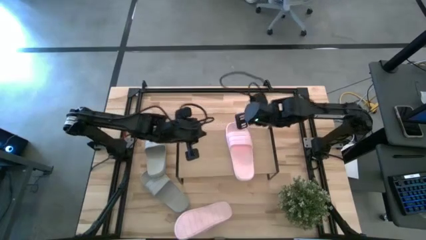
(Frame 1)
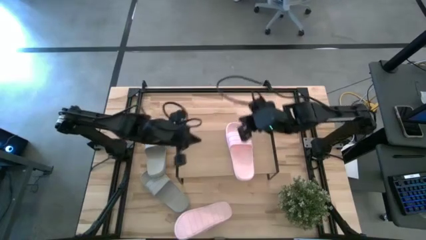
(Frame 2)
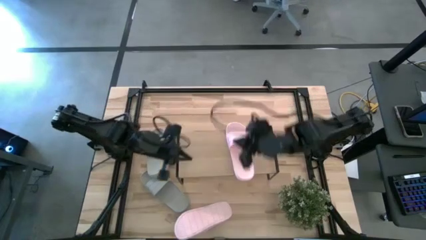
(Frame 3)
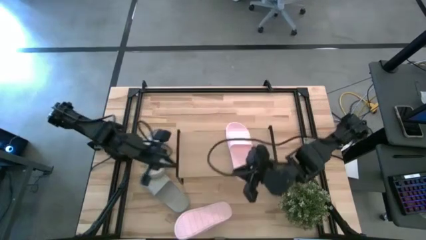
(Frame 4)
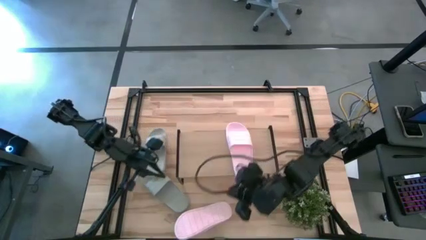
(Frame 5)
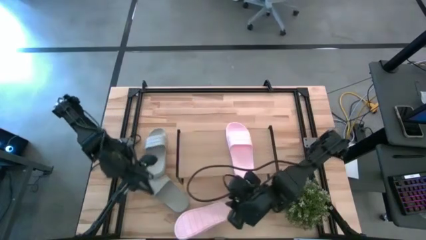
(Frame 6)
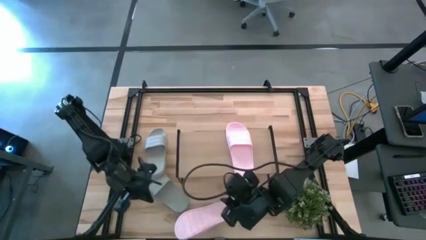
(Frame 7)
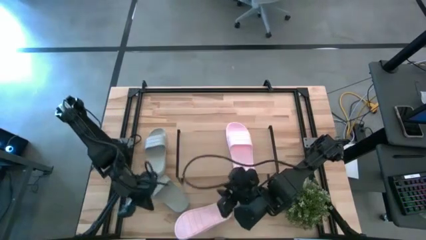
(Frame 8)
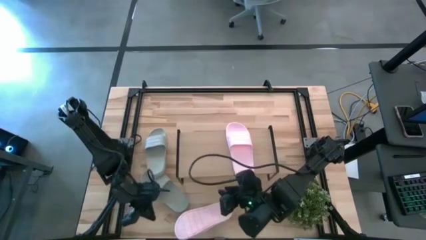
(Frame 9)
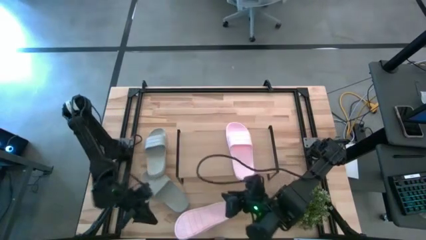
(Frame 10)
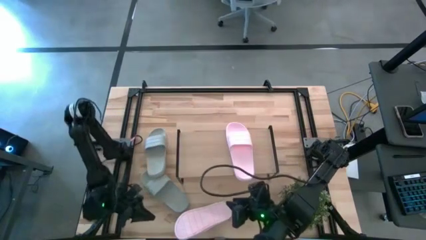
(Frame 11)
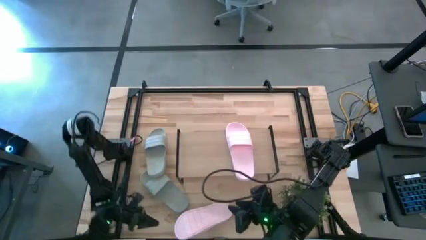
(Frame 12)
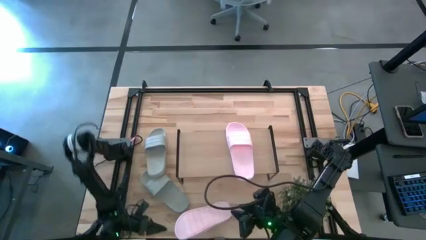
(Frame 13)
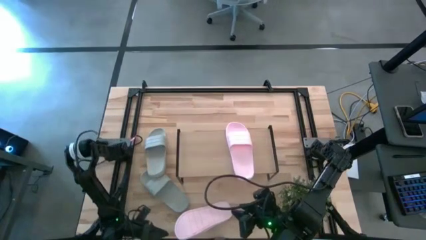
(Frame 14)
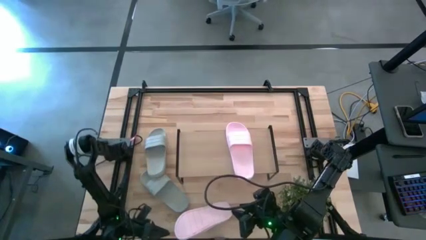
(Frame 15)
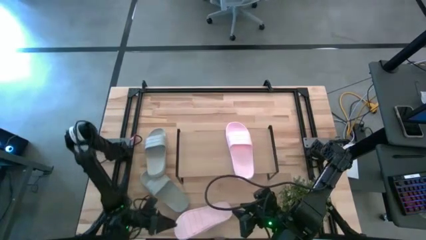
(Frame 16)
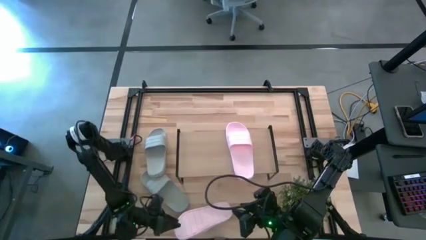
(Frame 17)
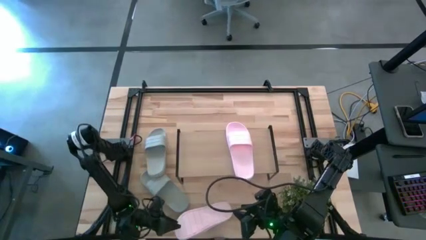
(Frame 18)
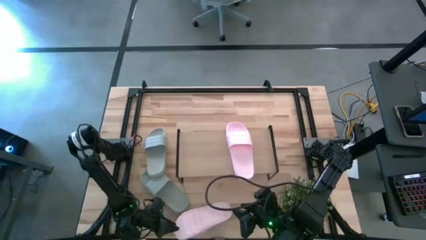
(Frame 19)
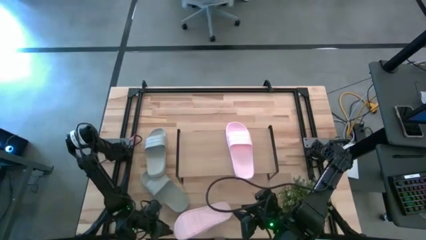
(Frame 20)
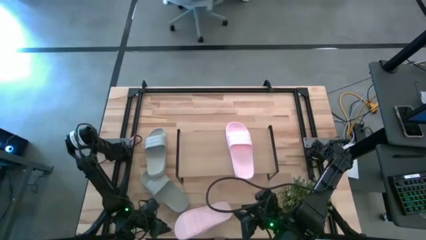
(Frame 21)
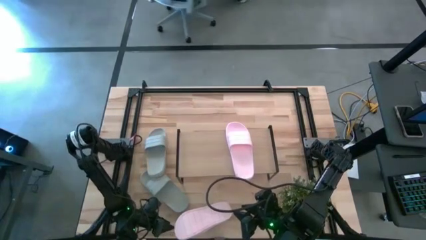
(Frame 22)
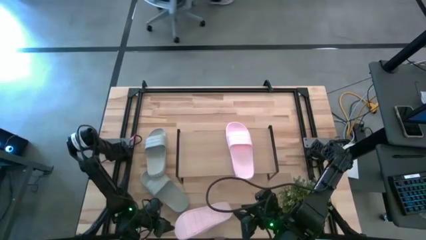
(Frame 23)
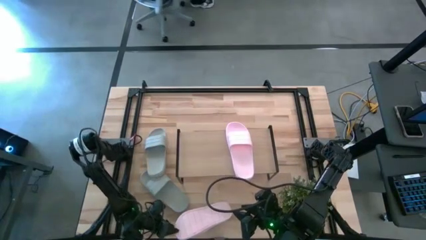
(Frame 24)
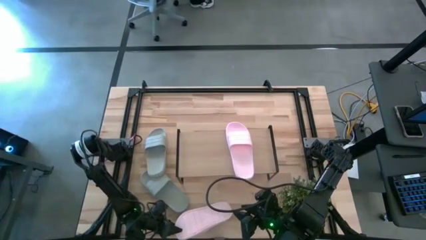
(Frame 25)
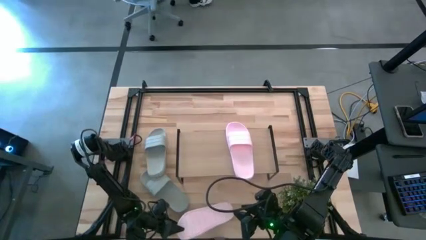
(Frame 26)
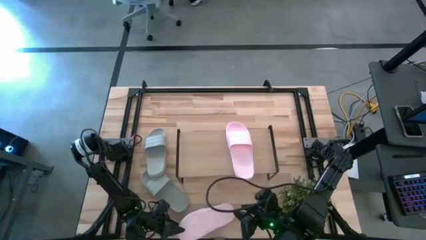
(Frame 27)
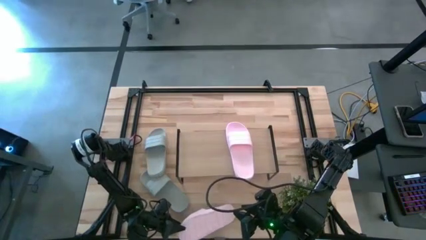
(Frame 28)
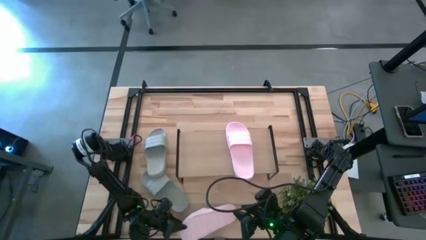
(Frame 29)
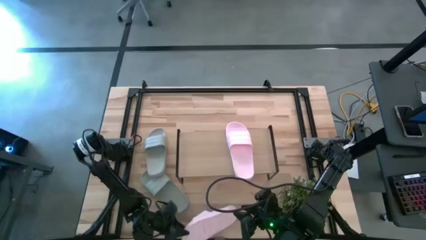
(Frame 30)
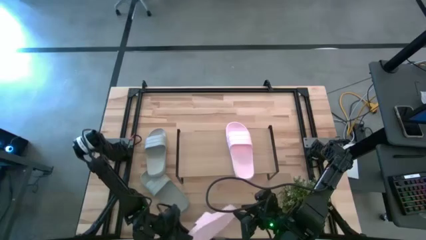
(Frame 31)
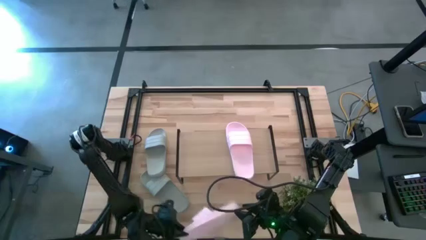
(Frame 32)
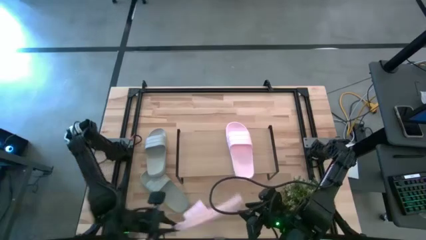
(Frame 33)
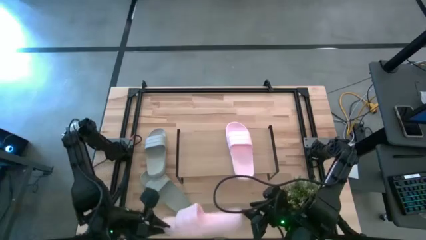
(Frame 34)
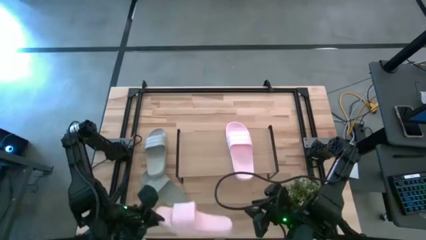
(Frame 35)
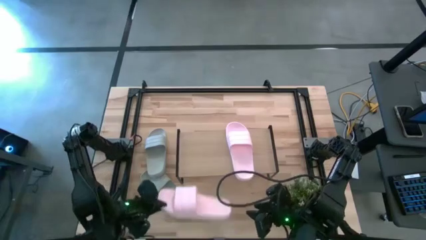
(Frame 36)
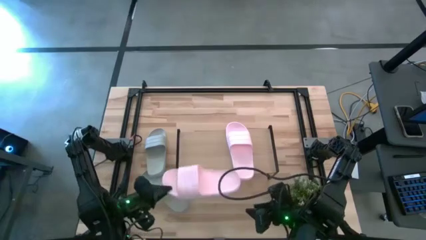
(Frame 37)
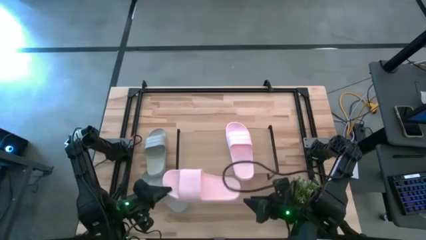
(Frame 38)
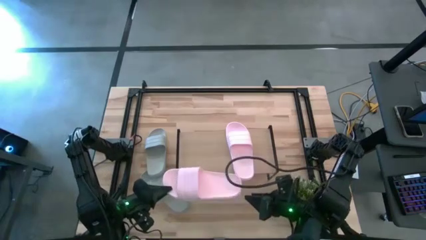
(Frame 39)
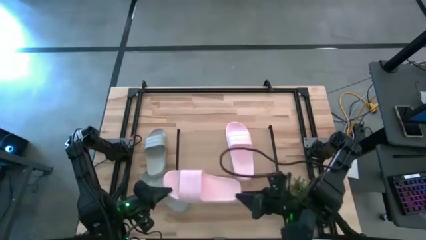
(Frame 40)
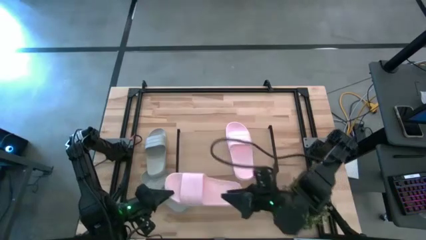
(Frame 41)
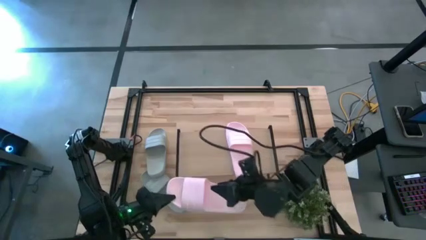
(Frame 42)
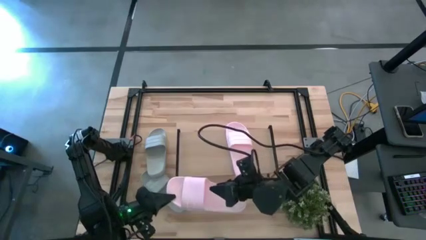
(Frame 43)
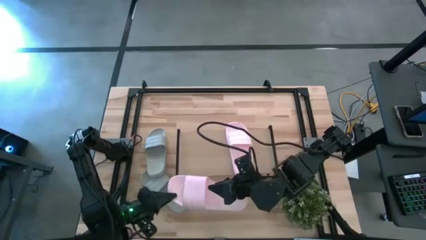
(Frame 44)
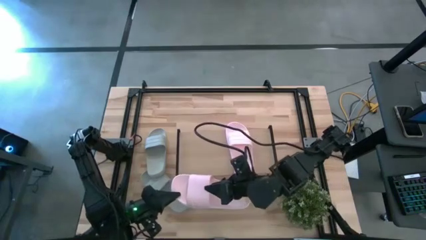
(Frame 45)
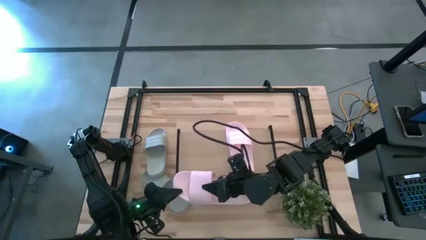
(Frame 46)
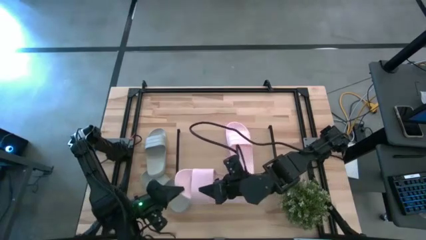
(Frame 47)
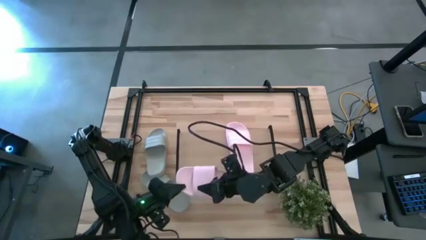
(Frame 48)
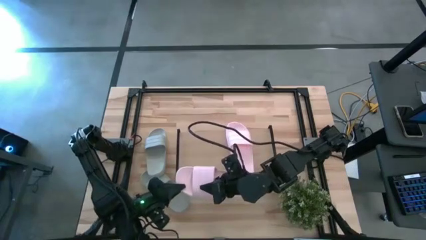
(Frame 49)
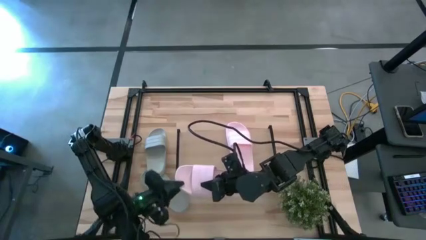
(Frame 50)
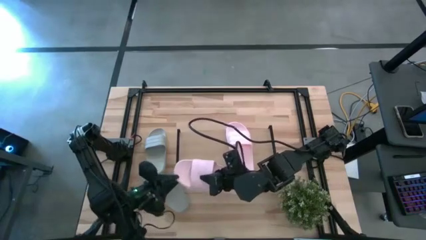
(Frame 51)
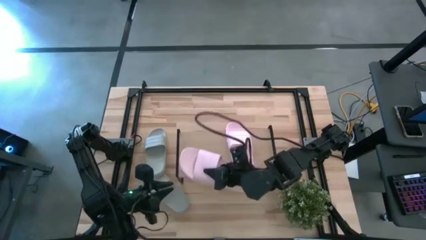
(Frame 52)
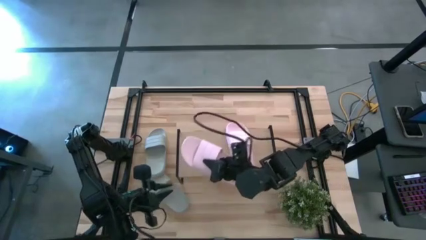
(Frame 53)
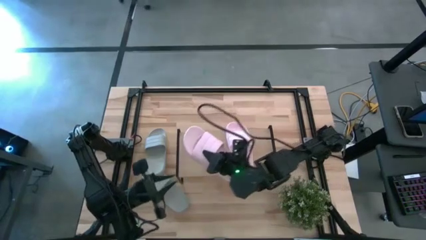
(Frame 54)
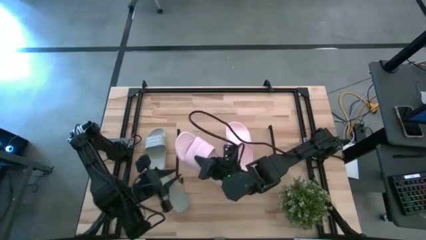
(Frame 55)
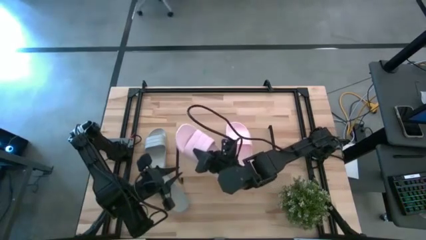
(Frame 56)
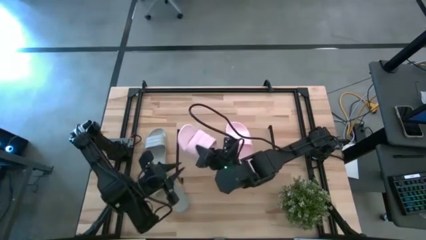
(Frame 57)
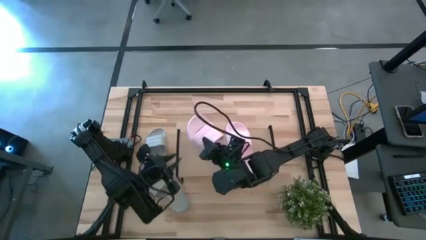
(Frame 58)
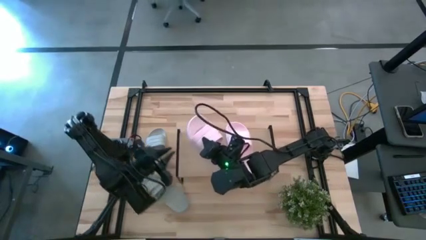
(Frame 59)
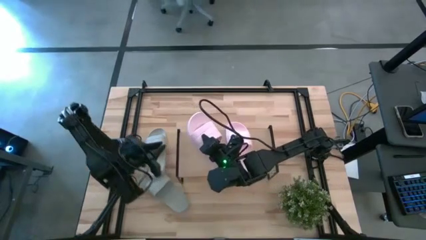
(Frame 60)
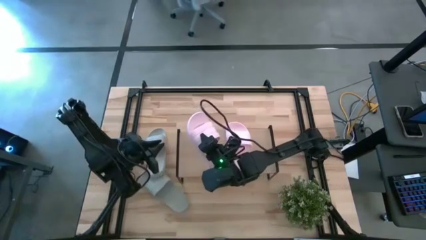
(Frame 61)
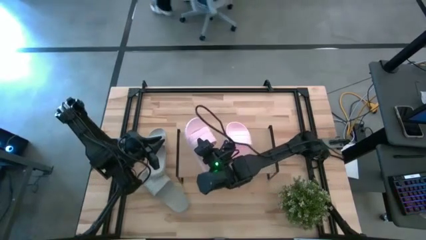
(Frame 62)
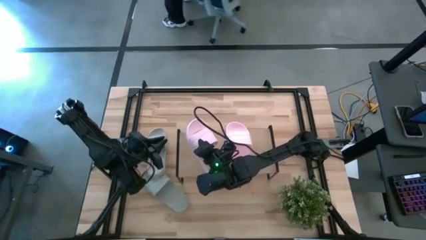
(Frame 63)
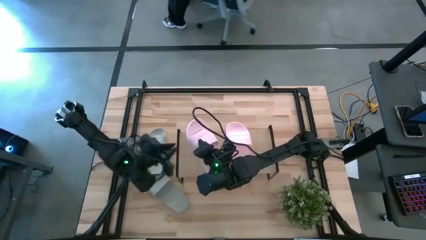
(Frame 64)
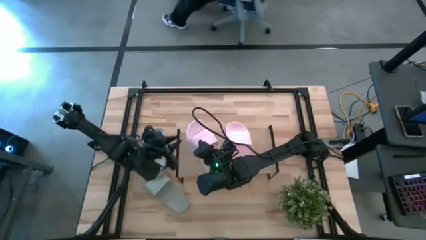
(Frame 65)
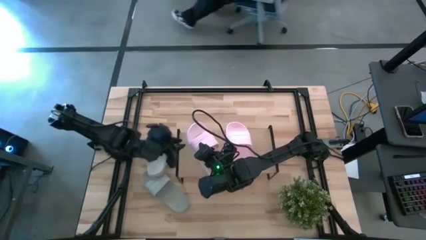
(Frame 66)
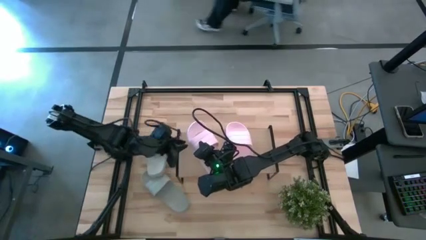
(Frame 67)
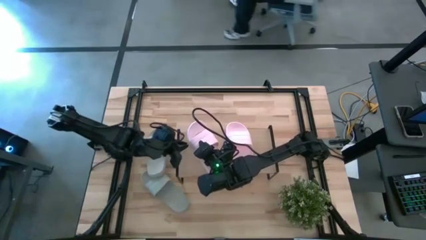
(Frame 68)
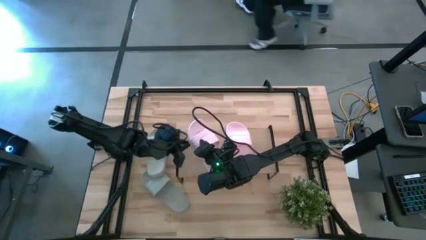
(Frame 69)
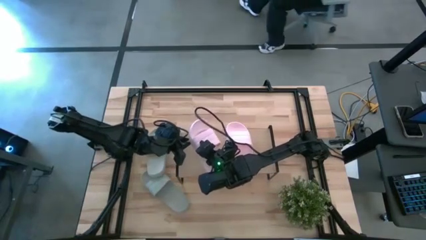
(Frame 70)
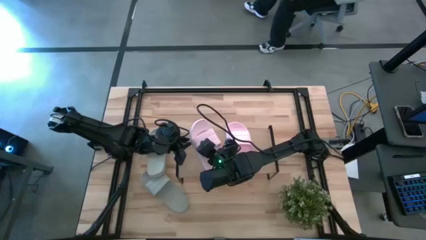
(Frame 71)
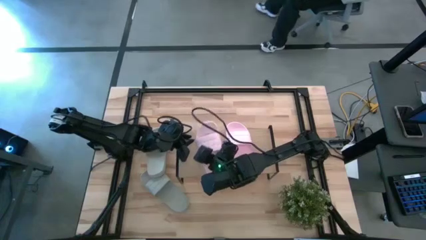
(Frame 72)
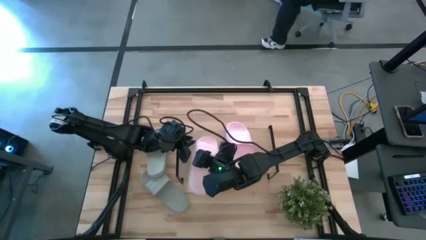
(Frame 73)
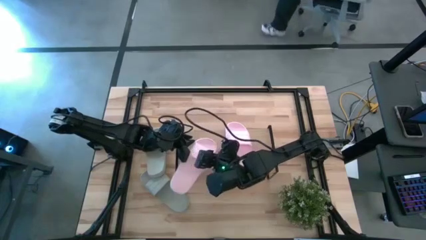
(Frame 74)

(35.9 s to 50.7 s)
Task: Pick and place slides into the shelf
Put the pink slide on the shelf
